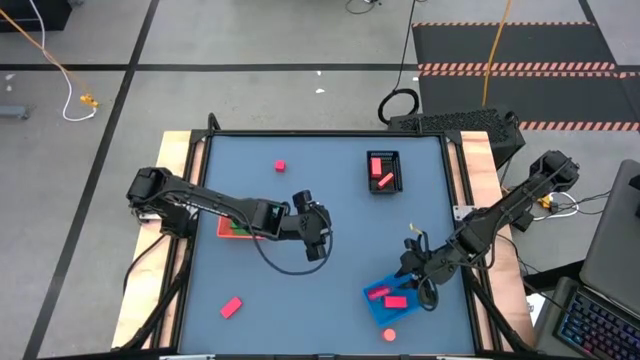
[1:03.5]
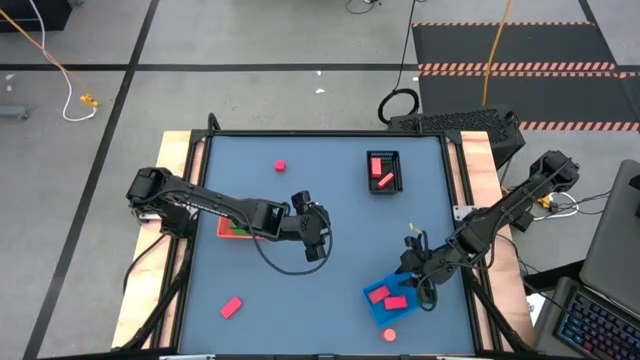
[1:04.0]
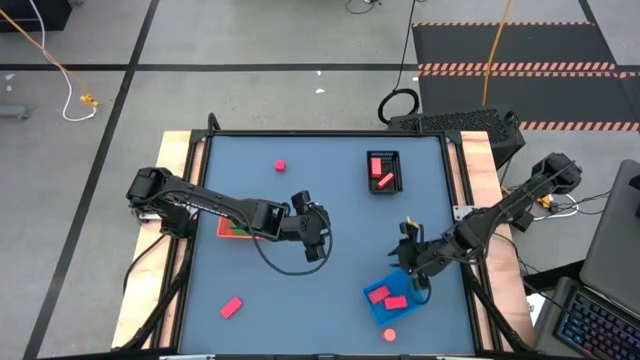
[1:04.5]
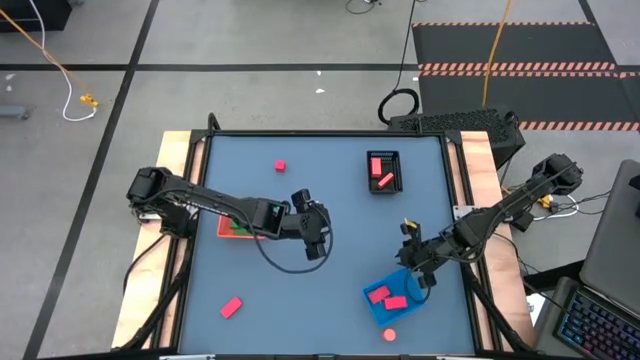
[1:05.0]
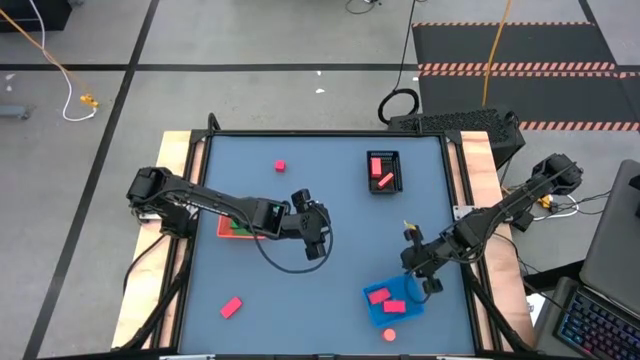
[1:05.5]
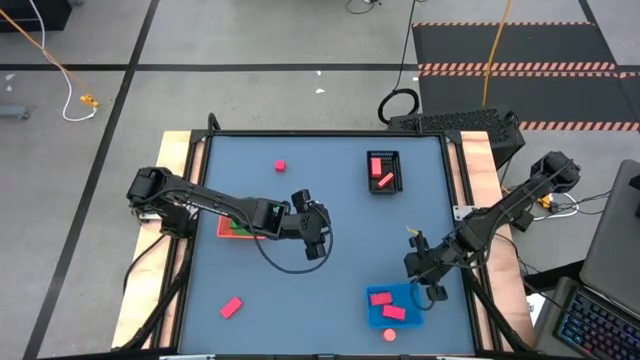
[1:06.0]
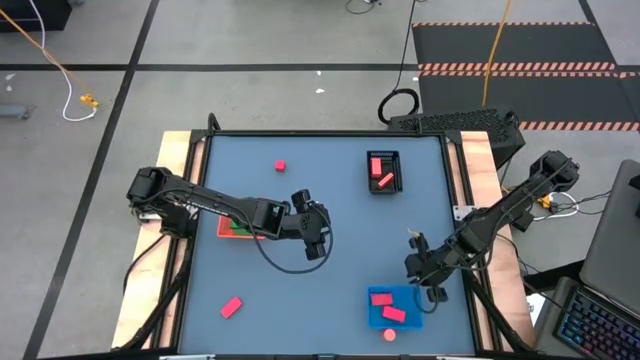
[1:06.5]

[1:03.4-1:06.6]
Task: Sort & place blocks by color
Adjust the blue bin

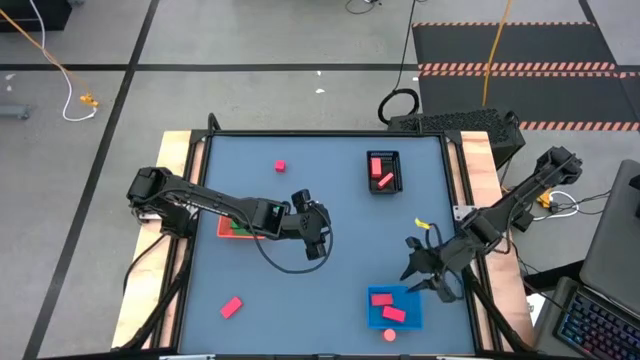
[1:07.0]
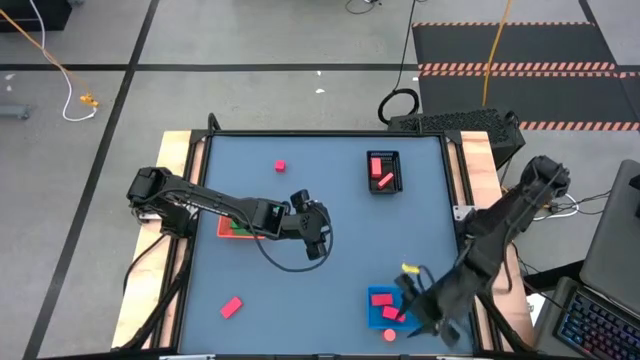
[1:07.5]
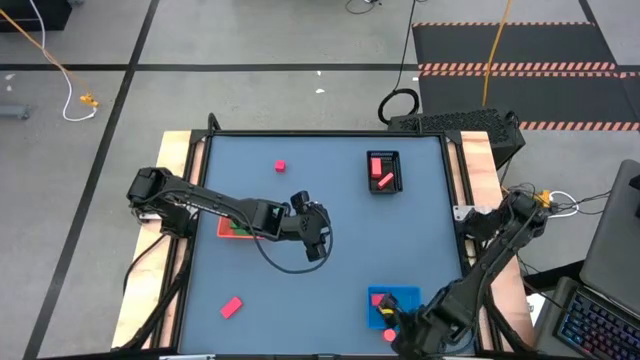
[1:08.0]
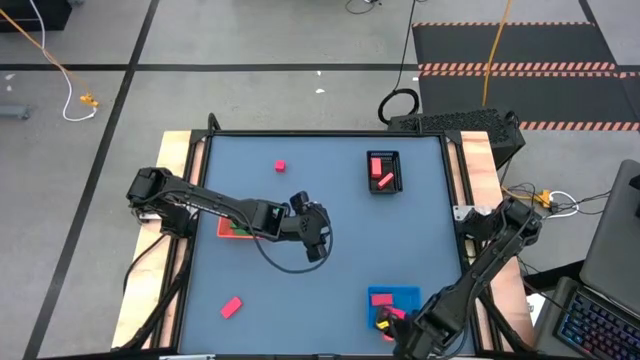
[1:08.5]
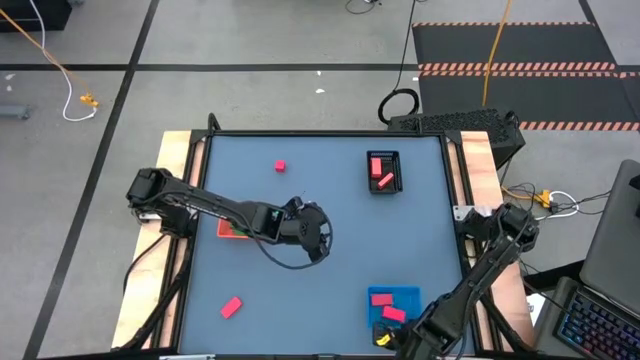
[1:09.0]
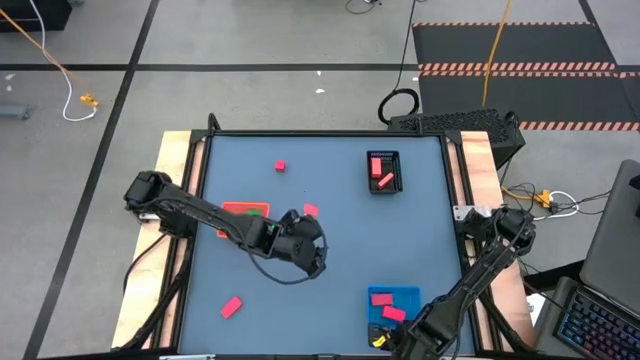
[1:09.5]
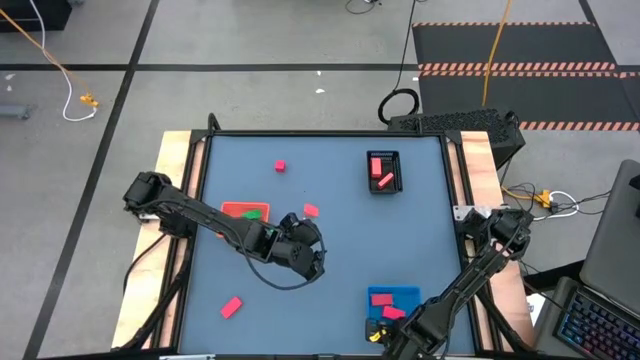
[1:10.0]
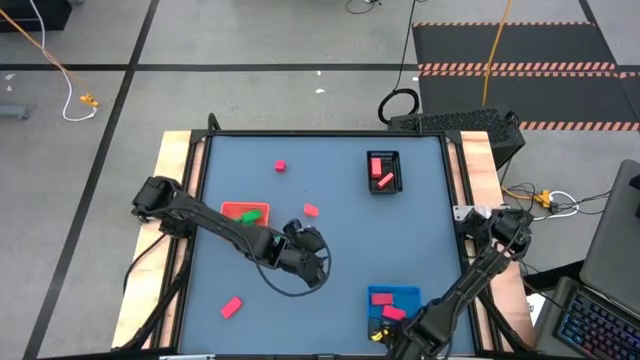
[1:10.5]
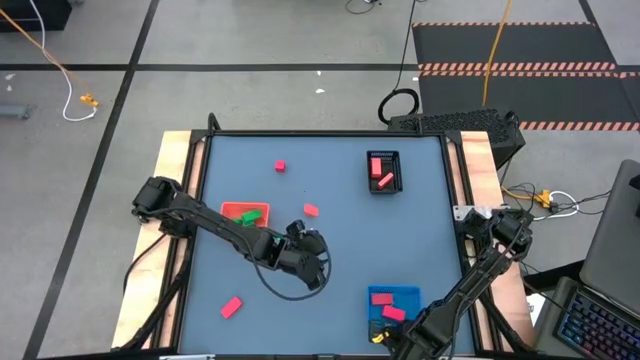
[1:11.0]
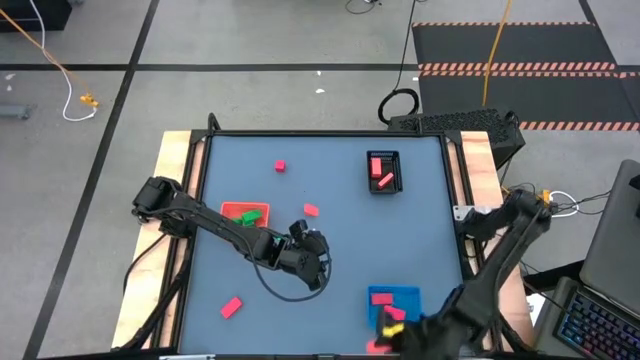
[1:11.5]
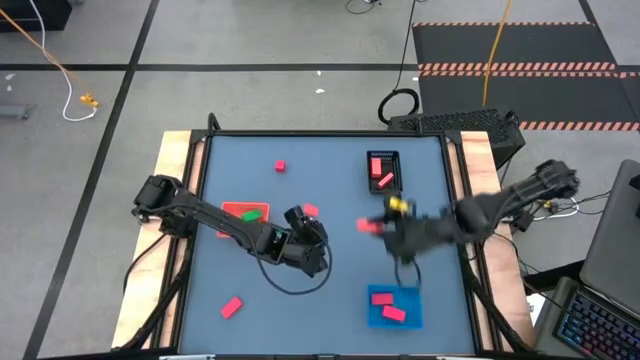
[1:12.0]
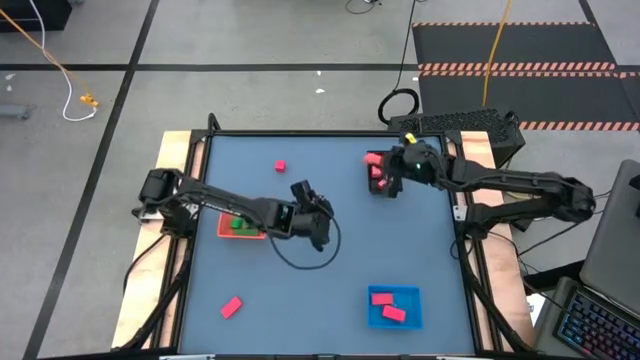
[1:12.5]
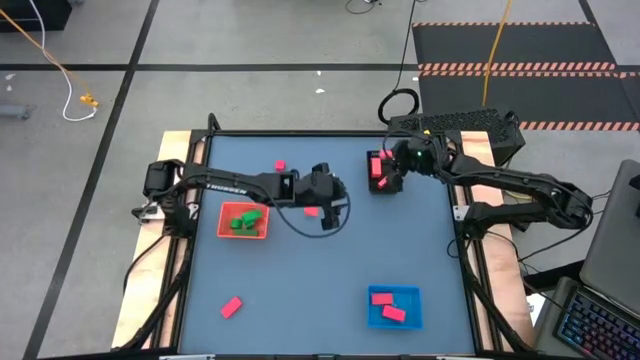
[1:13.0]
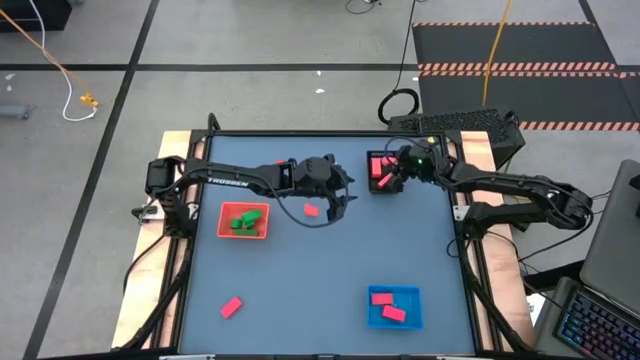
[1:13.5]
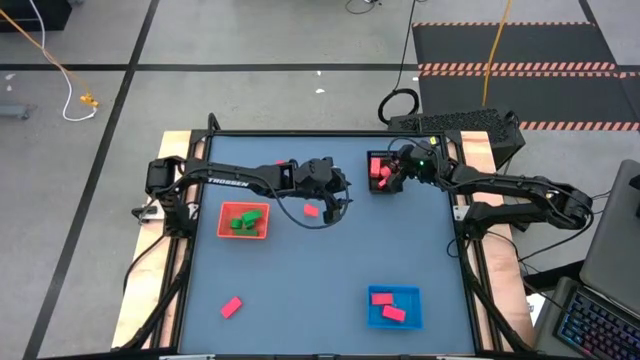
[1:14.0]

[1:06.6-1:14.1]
Put the orange block into the black bin

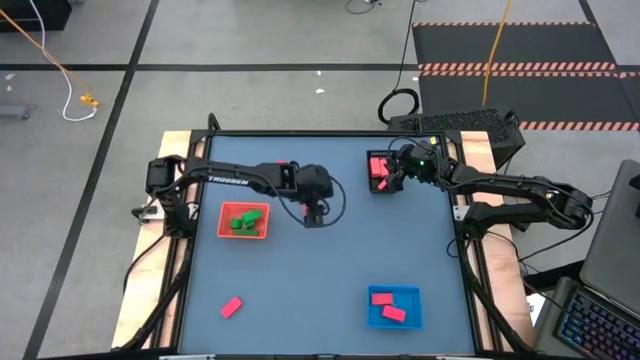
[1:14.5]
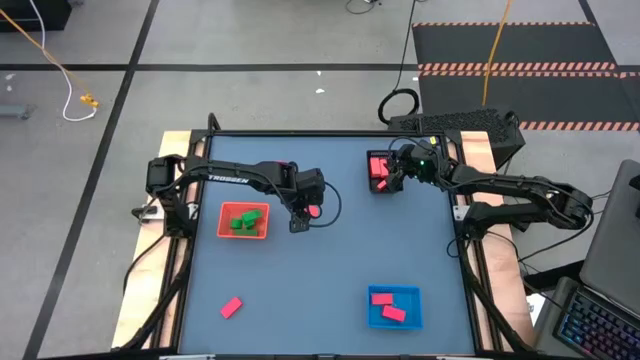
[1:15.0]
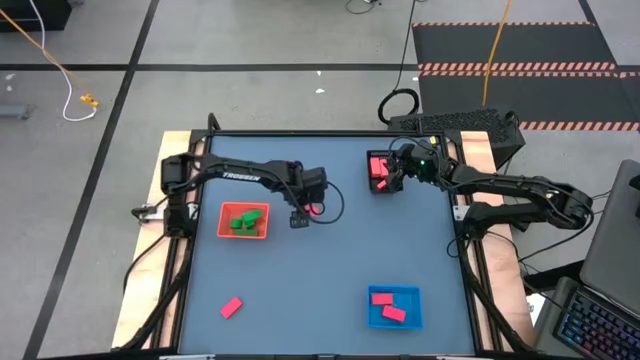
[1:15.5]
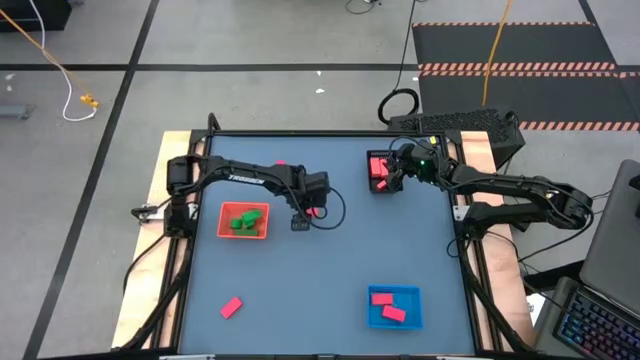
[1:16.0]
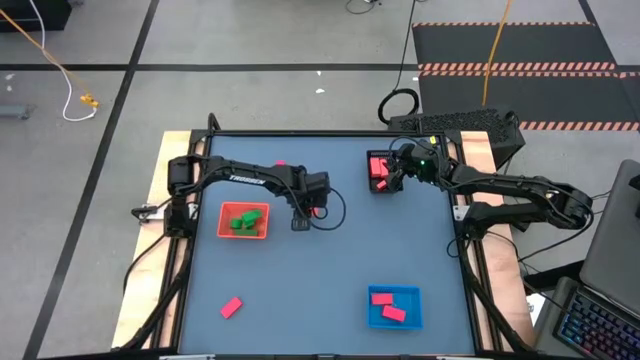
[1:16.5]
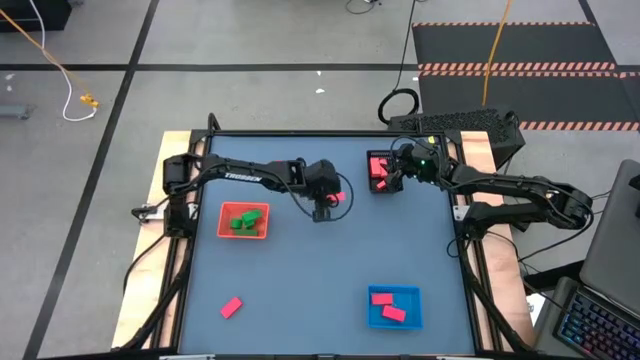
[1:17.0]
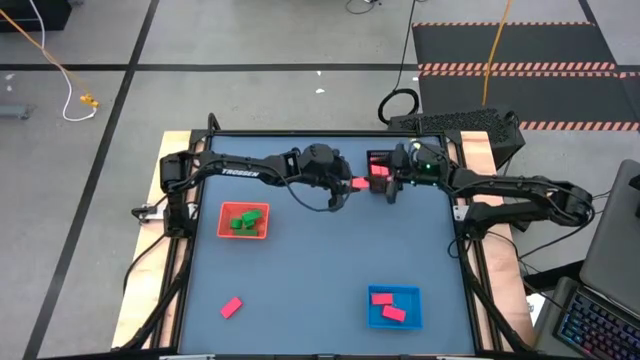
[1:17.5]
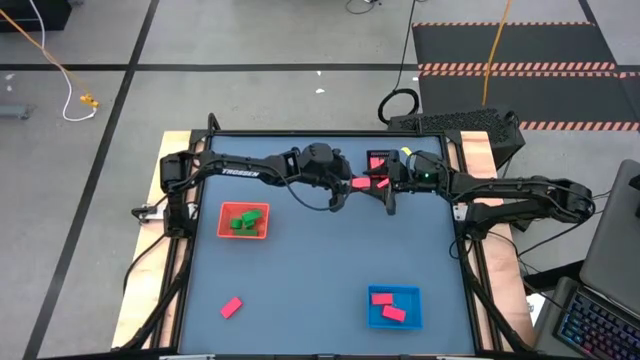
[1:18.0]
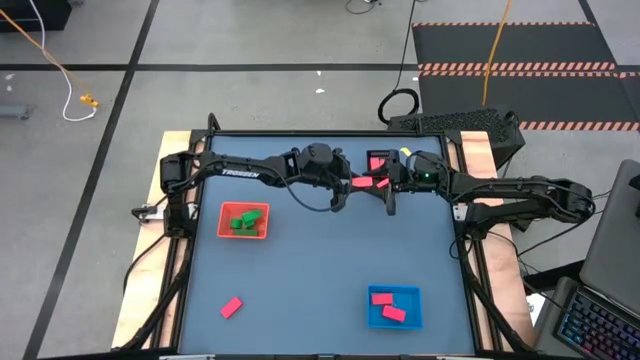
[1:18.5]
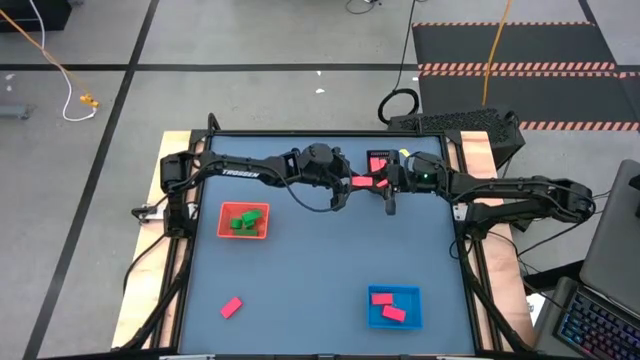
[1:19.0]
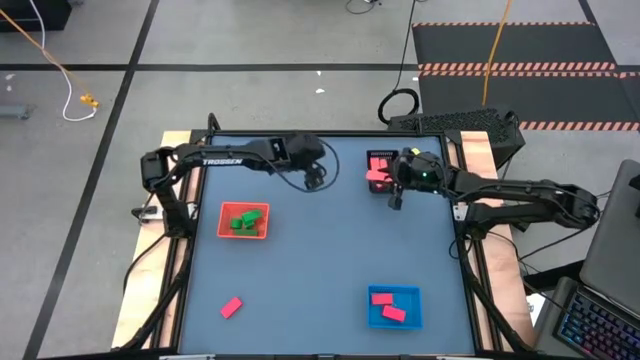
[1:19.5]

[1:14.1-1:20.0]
Put the orange block into the black bin

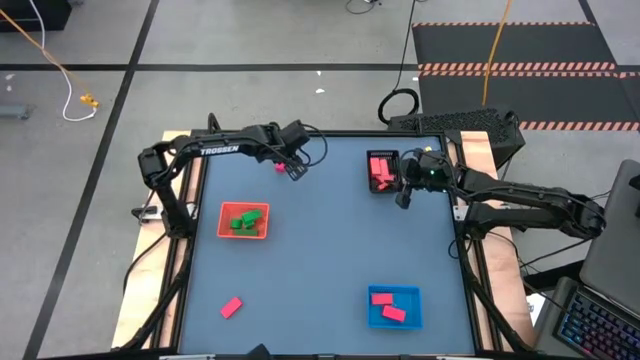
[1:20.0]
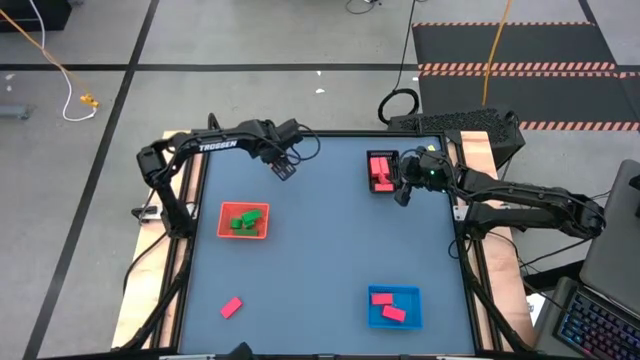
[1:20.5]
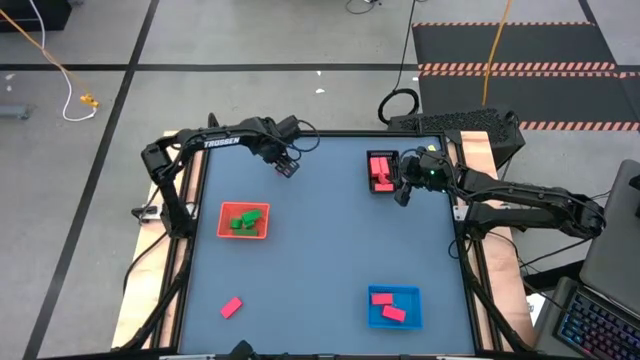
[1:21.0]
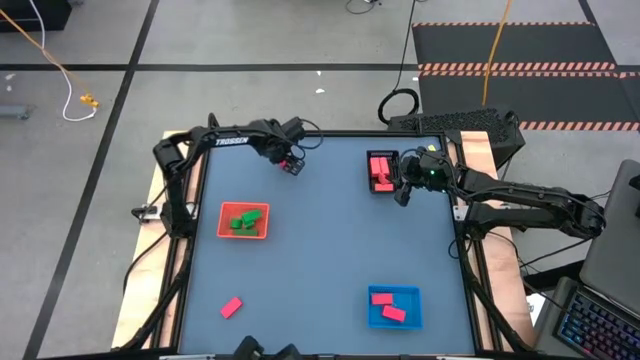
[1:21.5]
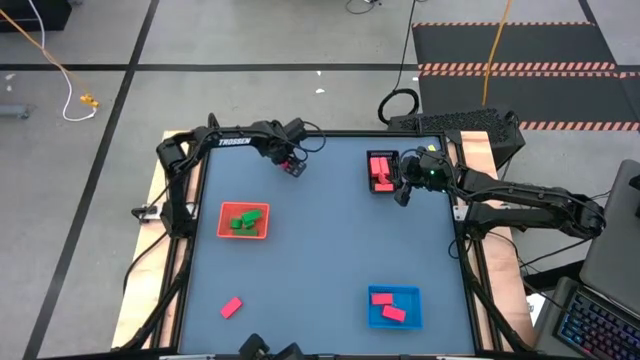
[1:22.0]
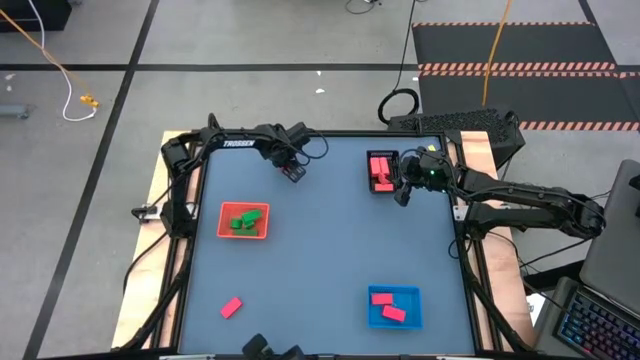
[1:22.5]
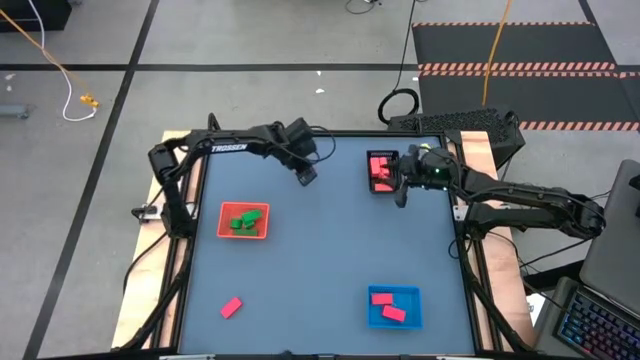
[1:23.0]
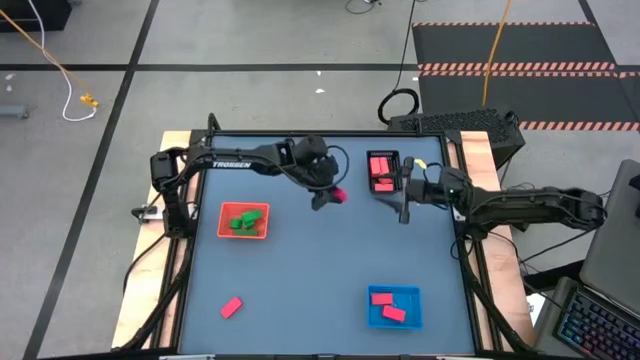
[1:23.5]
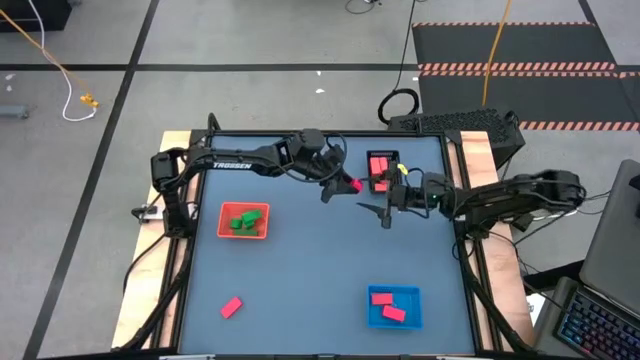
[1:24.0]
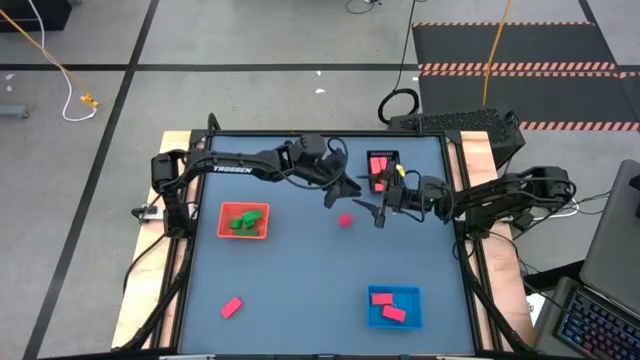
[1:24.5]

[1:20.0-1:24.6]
Put the red block into the blue bin
